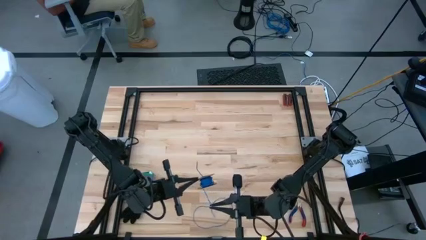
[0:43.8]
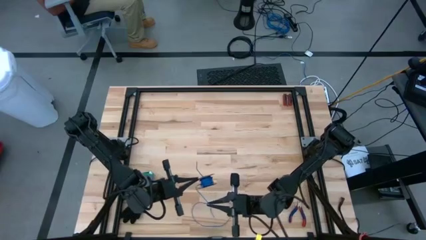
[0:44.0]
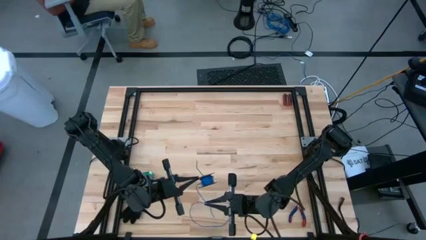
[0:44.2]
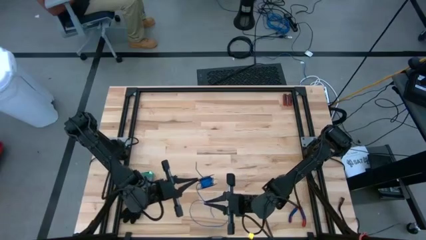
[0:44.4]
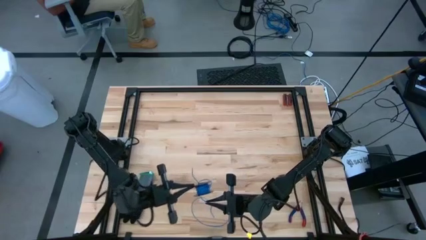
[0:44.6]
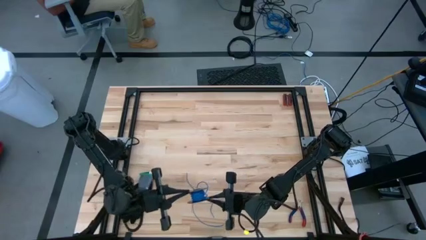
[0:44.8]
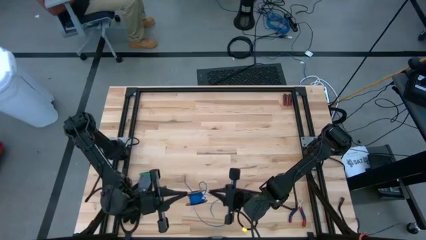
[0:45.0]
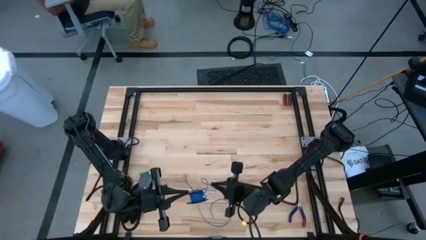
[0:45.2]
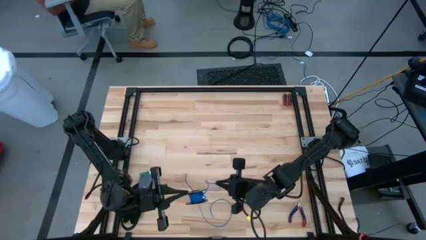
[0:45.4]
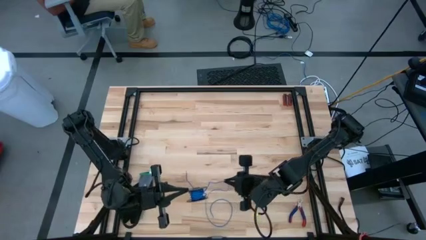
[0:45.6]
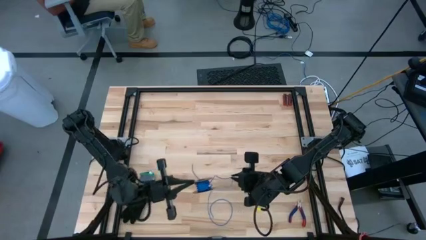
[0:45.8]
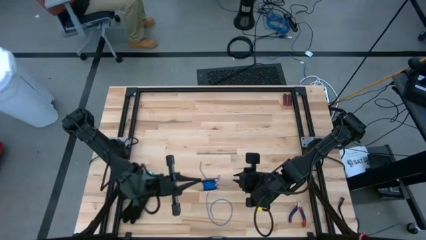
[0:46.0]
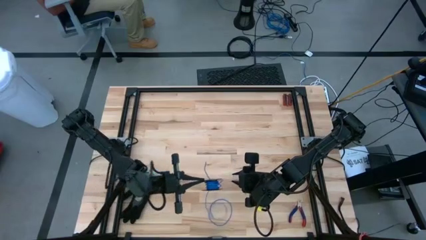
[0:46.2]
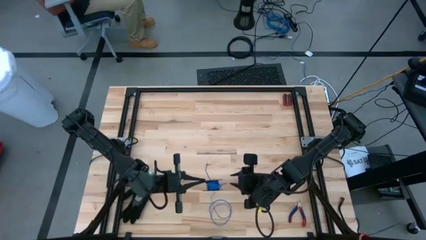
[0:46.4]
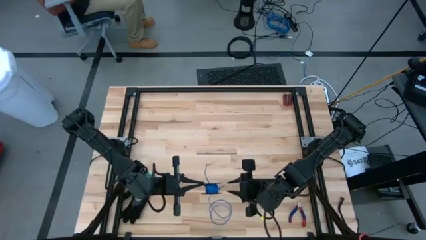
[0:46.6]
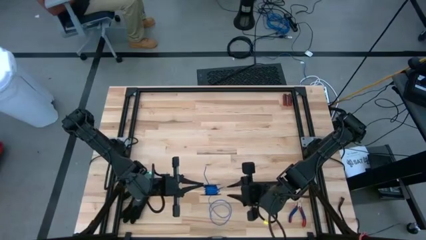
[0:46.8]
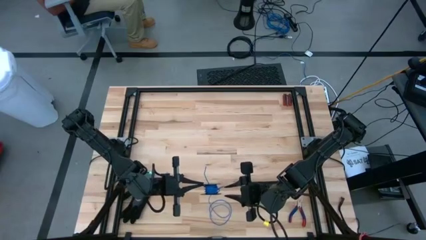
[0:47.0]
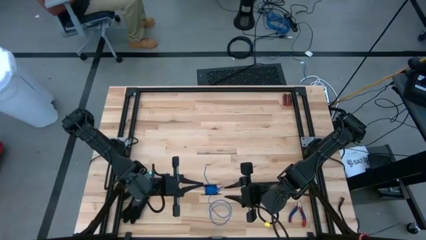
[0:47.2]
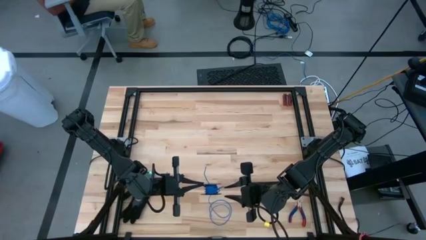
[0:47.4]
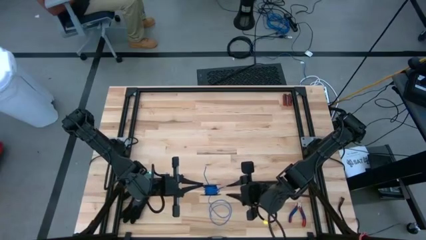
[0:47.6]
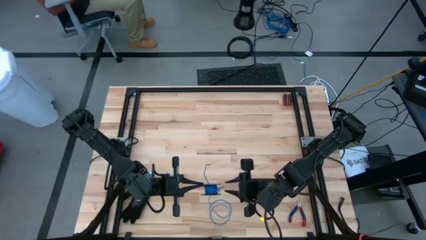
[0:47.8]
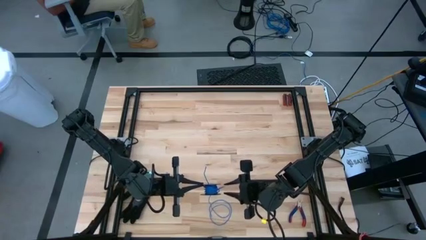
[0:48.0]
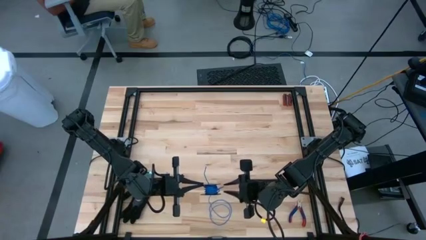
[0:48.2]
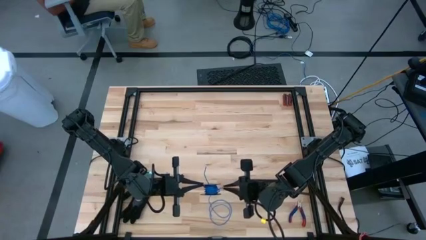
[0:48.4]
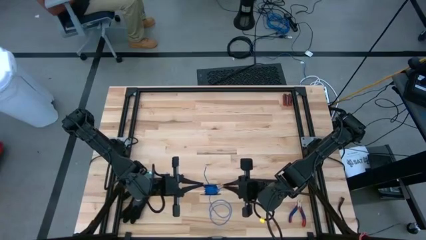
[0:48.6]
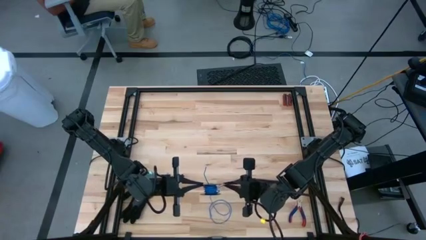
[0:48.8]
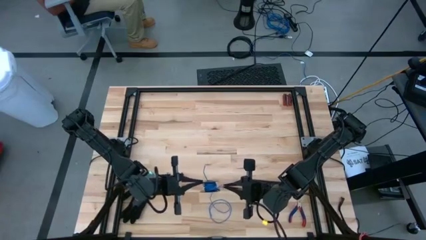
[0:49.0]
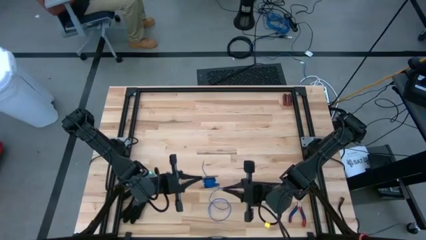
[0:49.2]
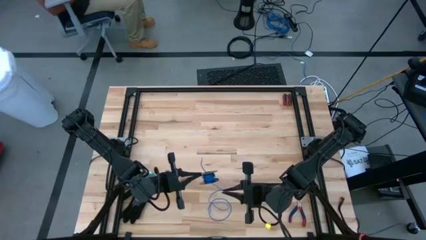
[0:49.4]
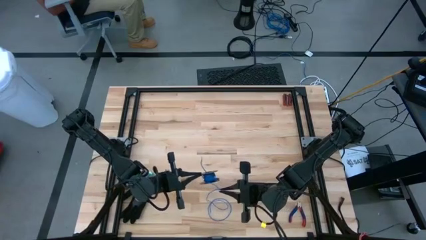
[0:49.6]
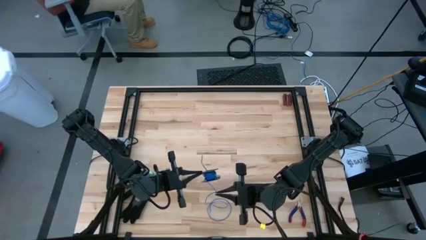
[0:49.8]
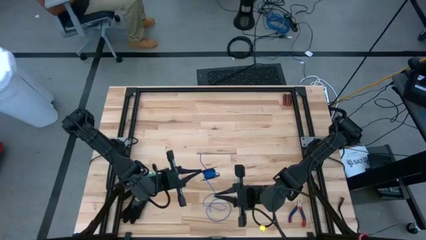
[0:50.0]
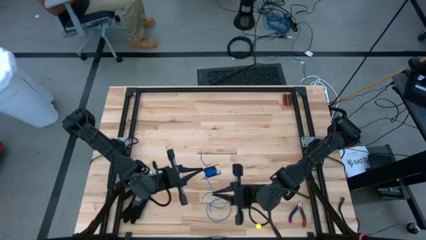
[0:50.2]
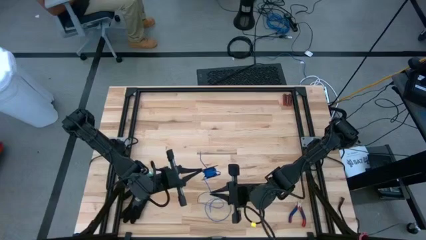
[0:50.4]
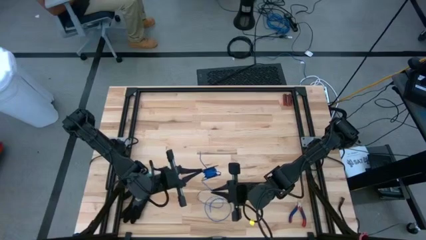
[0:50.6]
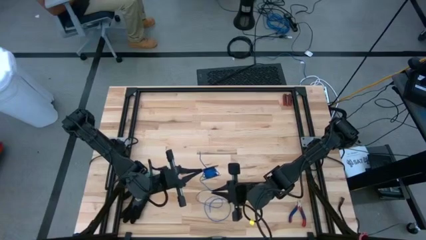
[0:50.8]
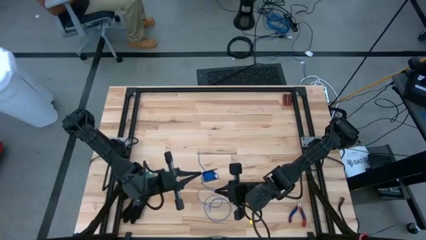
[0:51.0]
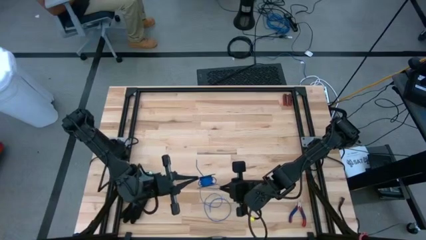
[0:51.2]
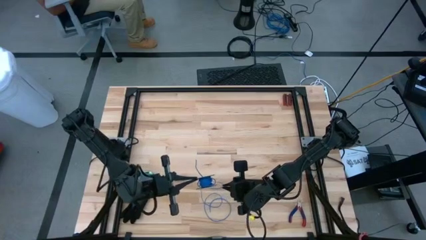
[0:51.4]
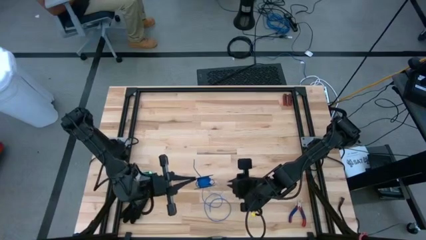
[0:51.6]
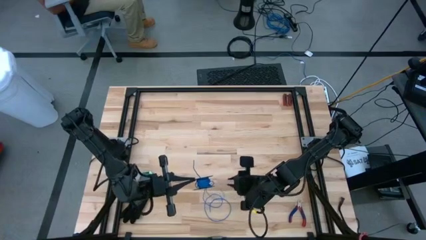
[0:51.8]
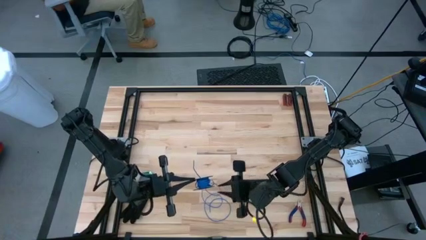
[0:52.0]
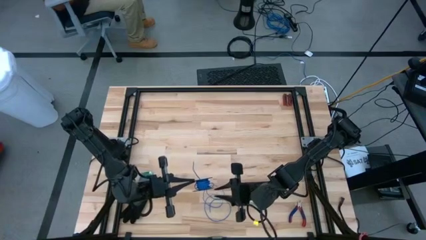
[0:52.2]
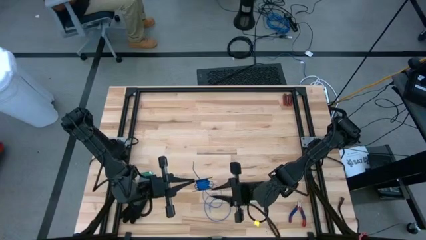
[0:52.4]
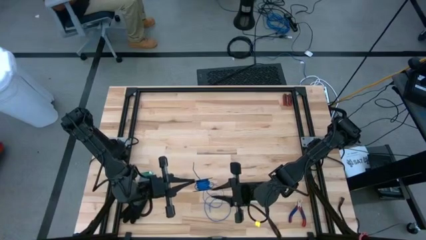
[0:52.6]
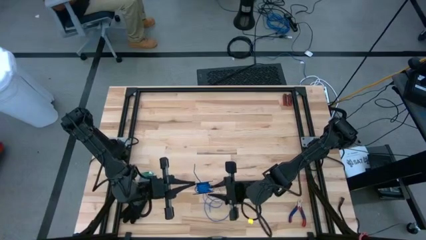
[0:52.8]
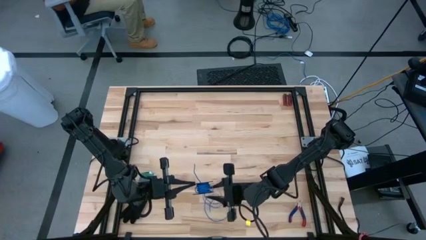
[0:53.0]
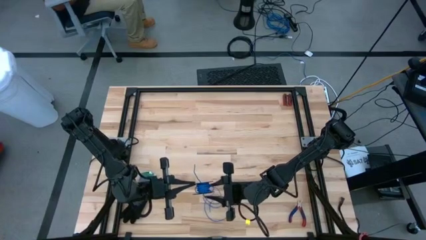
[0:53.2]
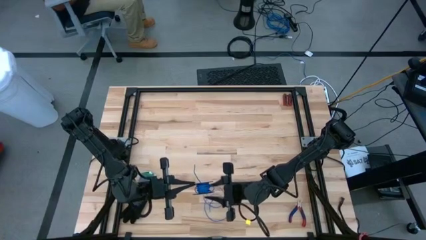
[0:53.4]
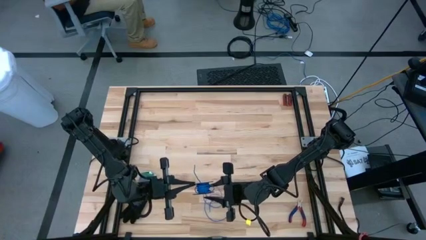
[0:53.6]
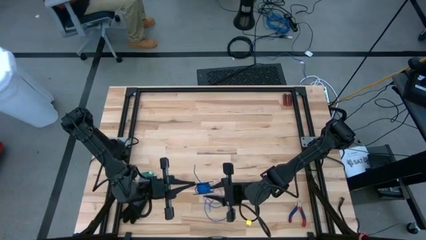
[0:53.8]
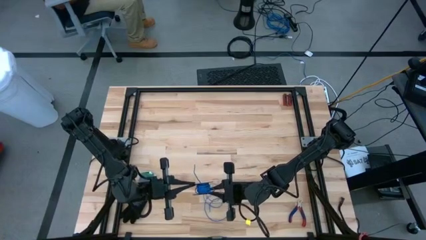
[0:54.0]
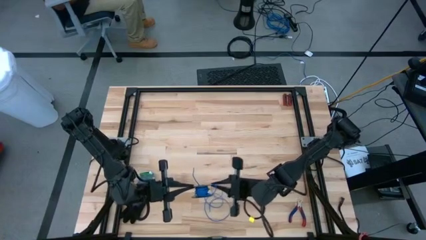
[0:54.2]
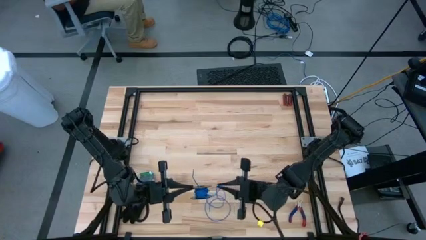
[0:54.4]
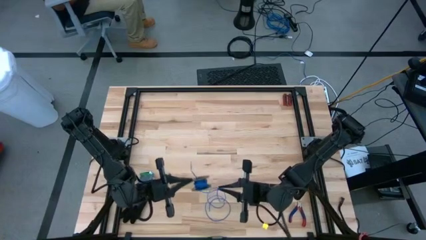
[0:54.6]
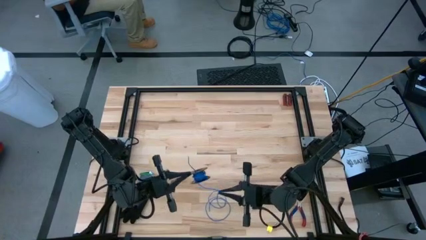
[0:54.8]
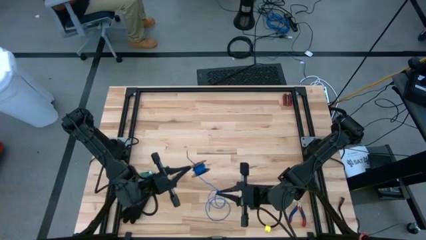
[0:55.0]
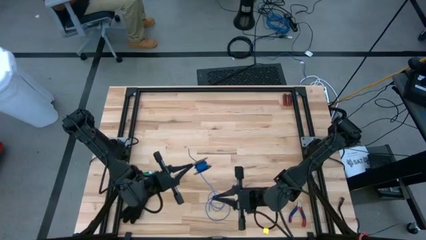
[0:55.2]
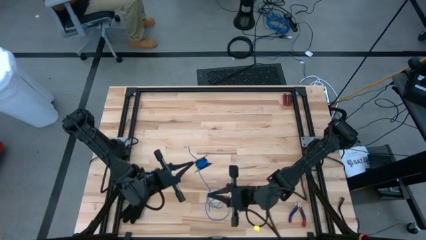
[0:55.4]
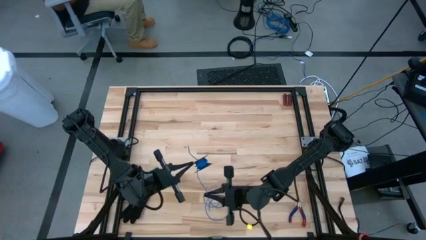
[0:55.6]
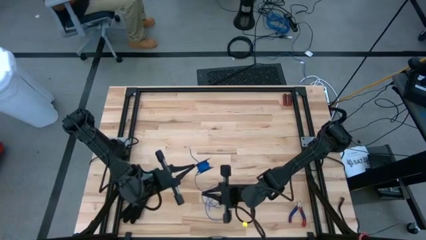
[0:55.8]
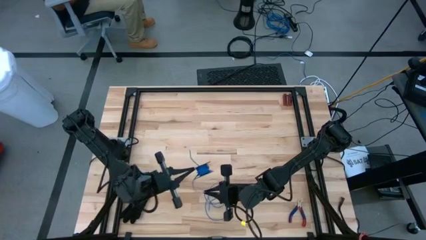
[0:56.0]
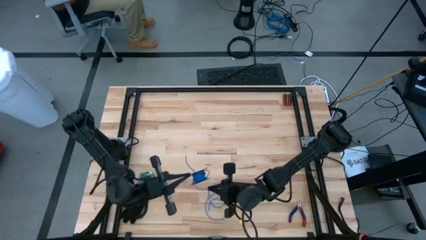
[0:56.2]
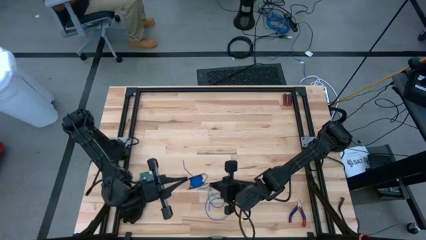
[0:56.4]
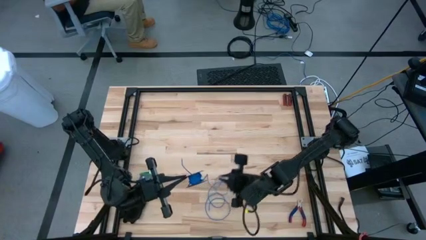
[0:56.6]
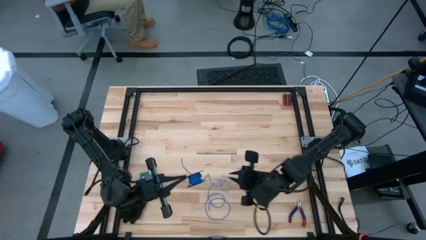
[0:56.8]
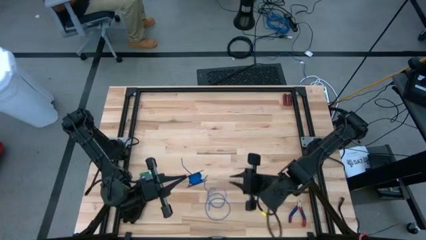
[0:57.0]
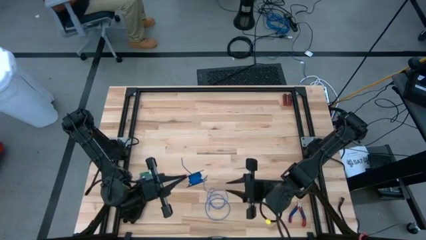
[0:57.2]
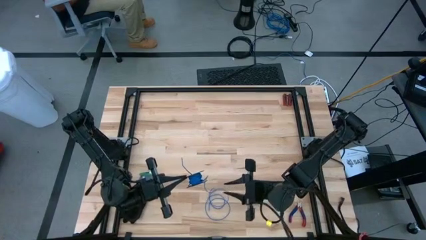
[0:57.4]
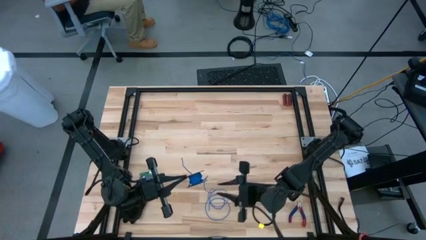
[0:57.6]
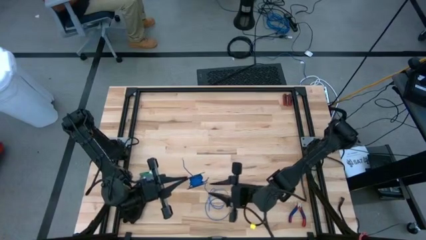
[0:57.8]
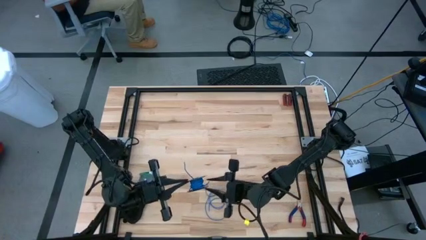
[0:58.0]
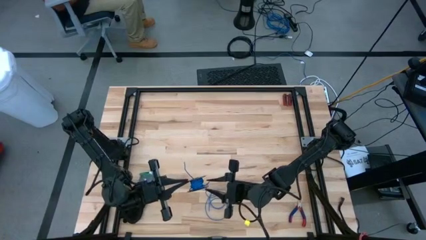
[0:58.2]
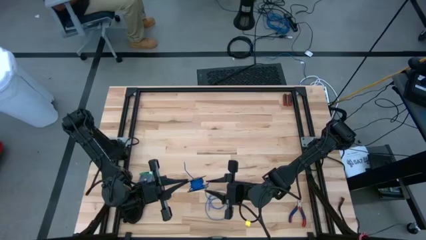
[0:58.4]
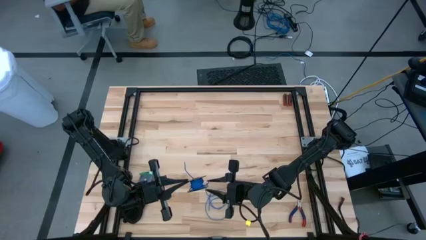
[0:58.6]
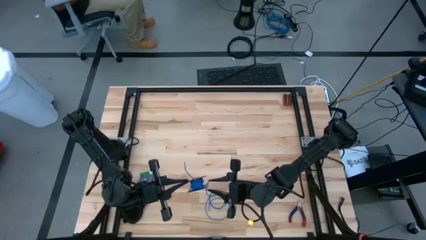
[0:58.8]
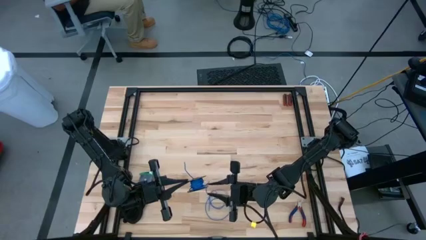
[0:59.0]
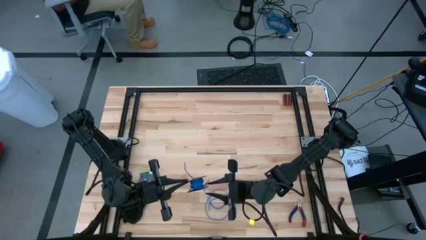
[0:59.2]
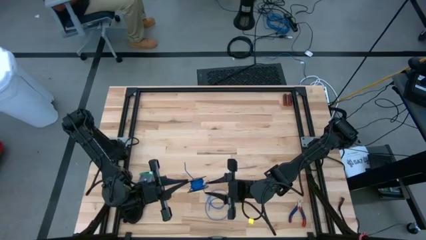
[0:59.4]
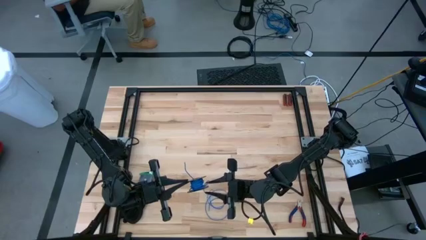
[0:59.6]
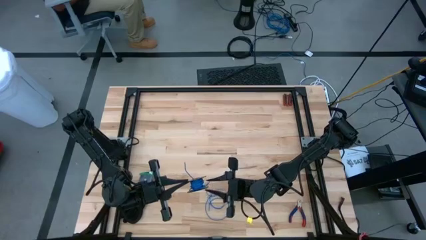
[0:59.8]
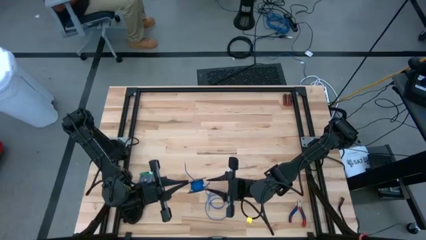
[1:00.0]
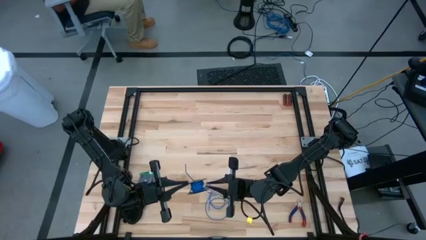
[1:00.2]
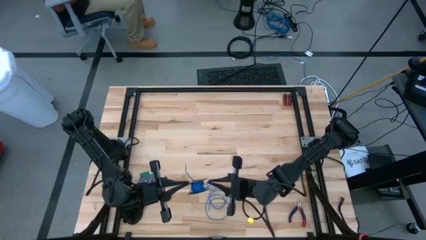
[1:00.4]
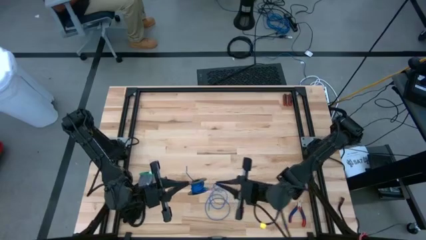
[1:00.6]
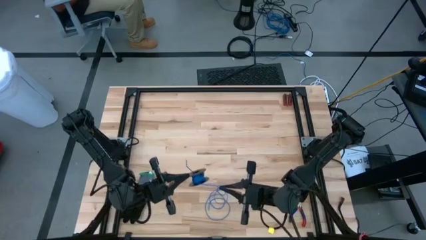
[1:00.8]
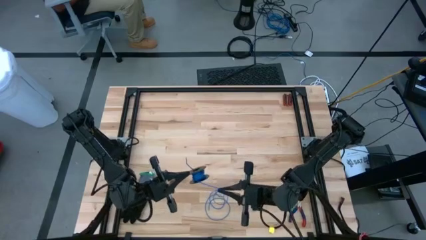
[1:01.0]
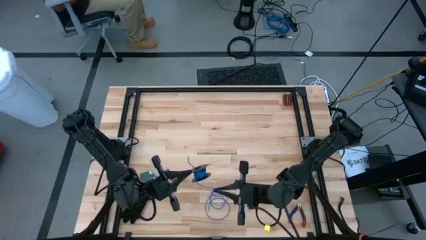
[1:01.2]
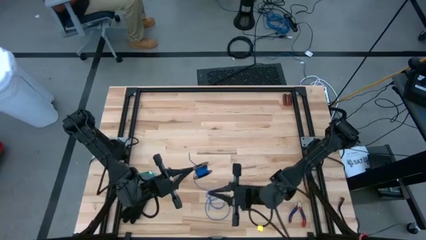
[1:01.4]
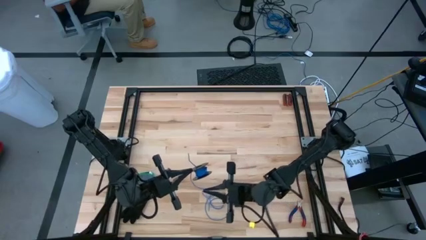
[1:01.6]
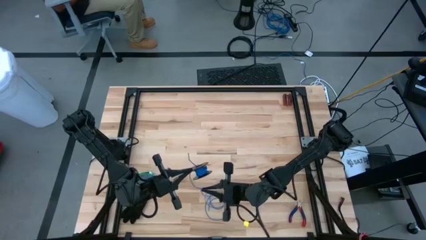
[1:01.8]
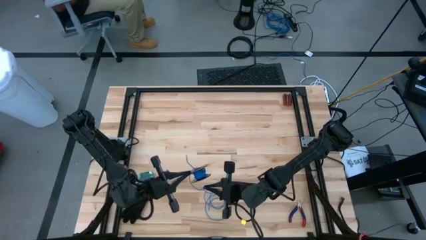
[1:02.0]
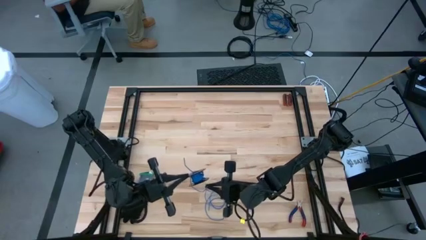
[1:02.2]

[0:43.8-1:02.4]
Task: Coil cords
Uncoil the blue wire from the spool
